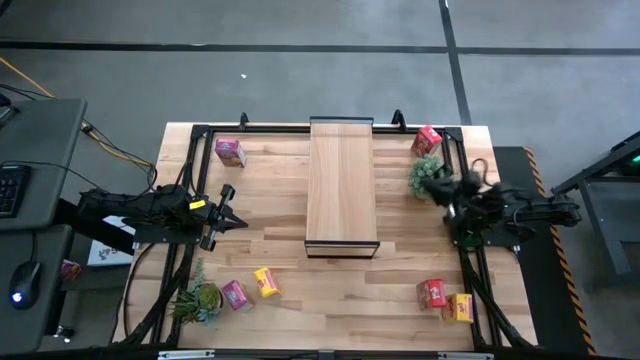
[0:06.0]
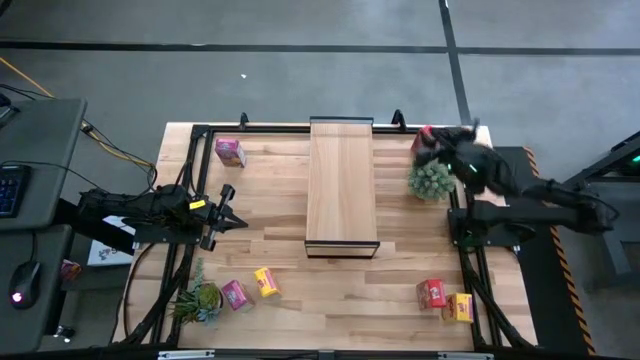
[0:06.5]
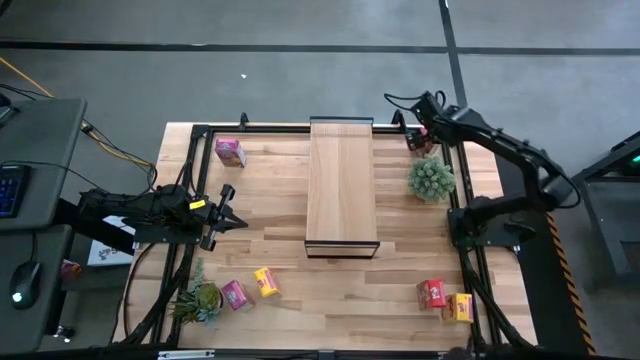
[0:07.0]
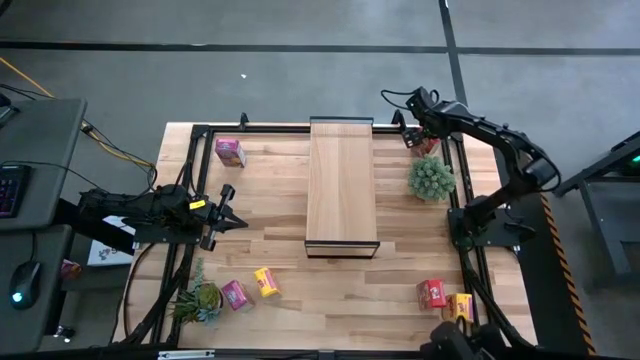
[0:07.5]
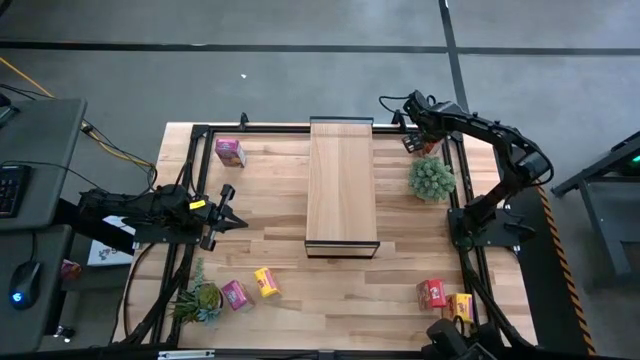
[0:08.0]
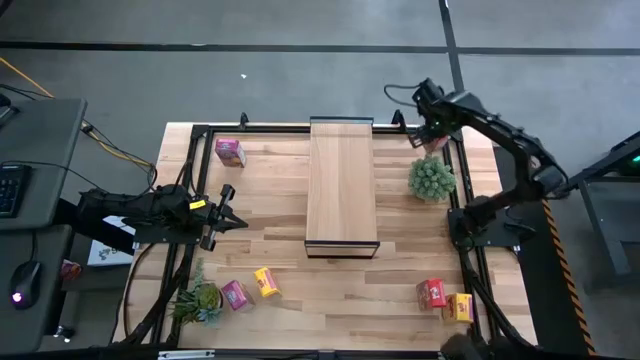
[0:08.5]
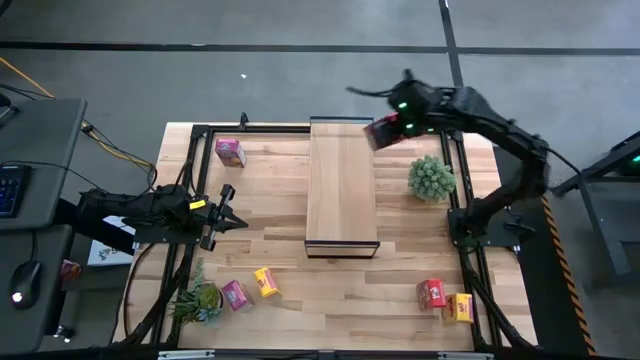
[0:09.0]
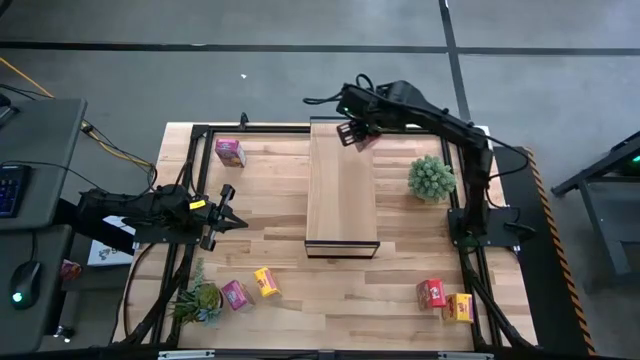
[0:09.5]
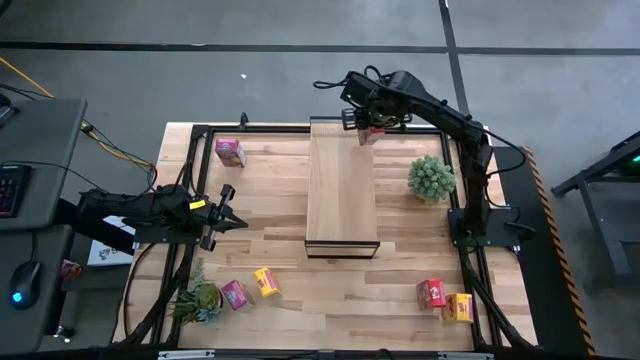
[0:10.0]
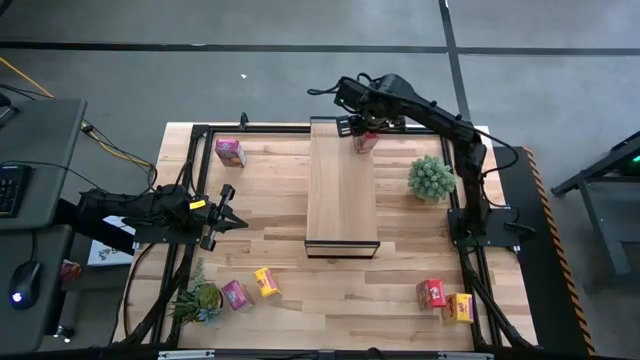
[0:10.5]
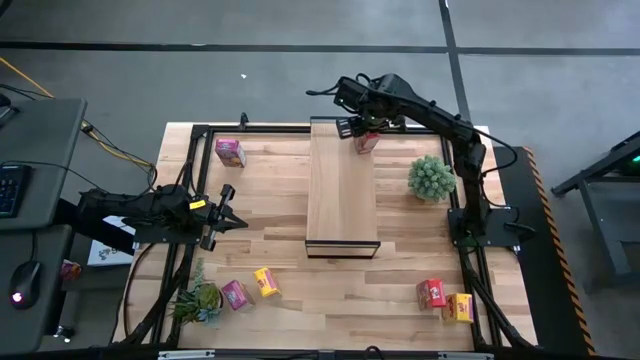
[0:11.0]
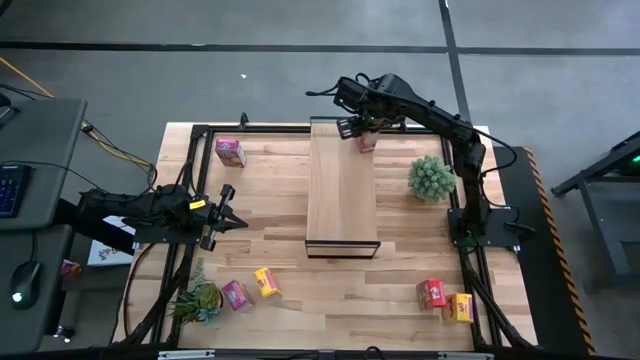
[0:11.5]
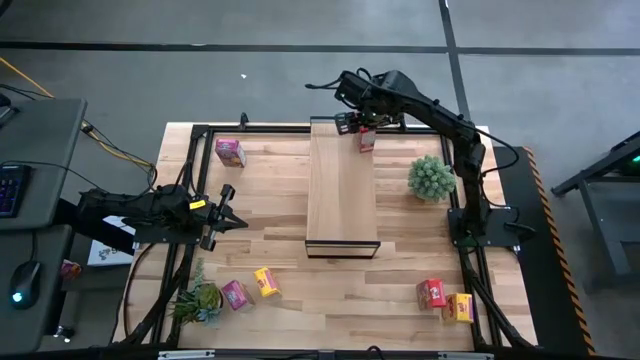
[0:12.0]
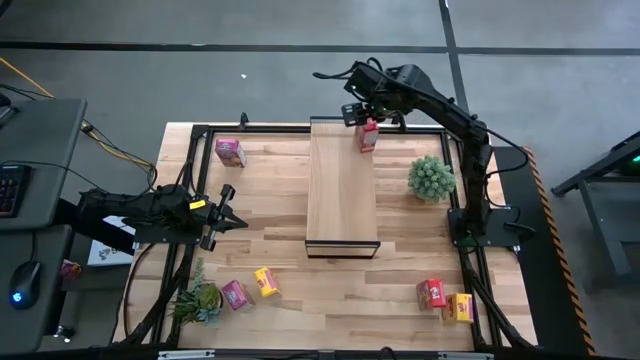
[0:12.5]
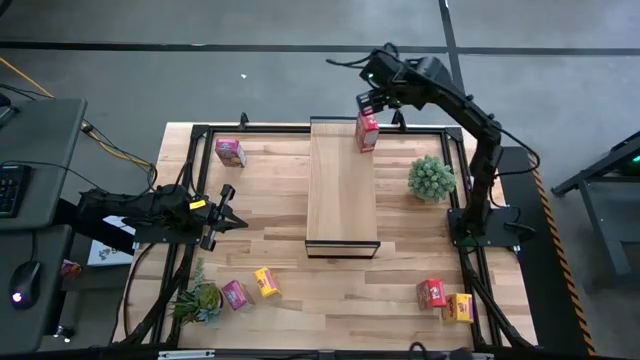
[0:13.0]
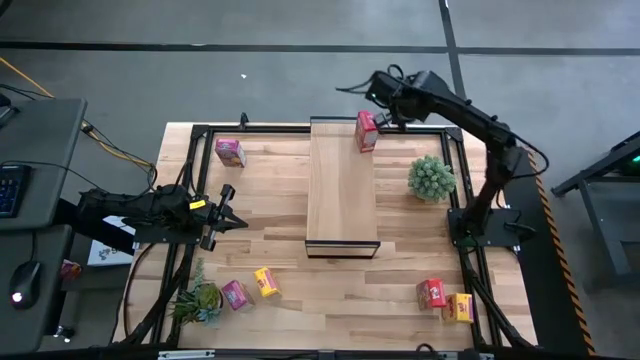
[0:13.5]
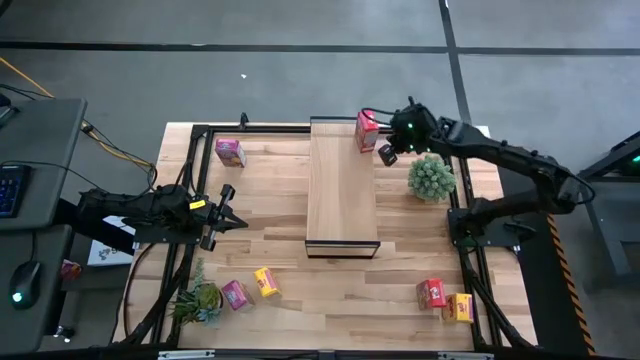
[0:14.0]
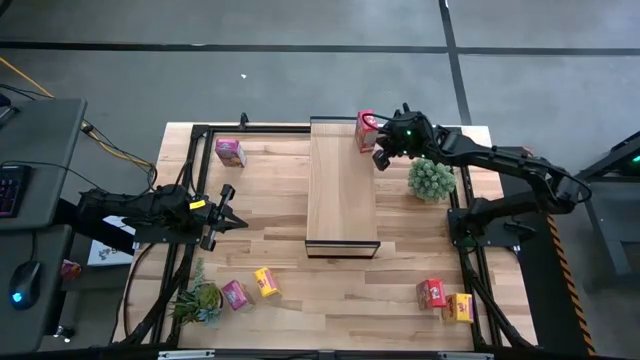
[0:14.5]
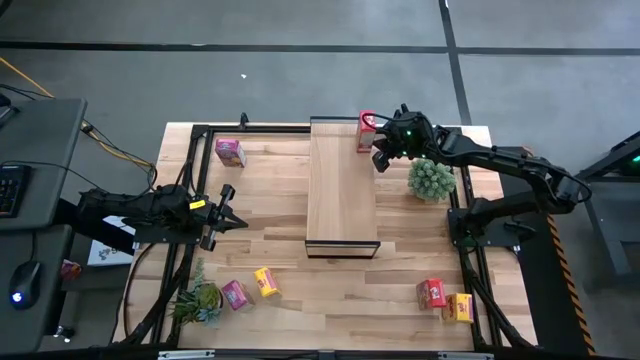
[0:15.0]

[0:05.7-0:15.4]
Task: Stack cereal on shelf
Put the top red cereal box on the shelf

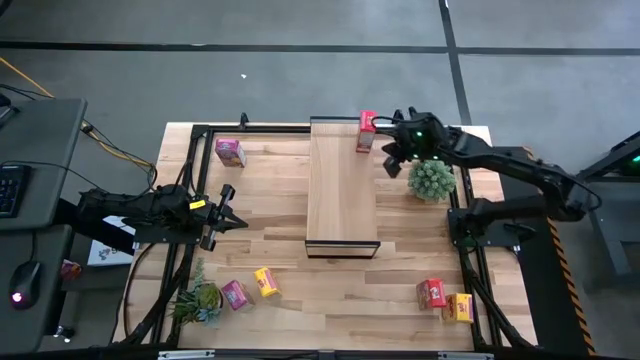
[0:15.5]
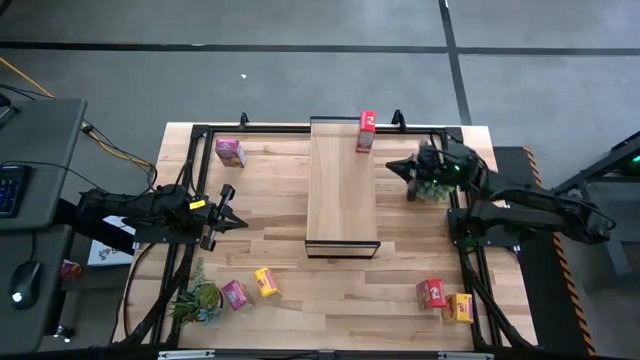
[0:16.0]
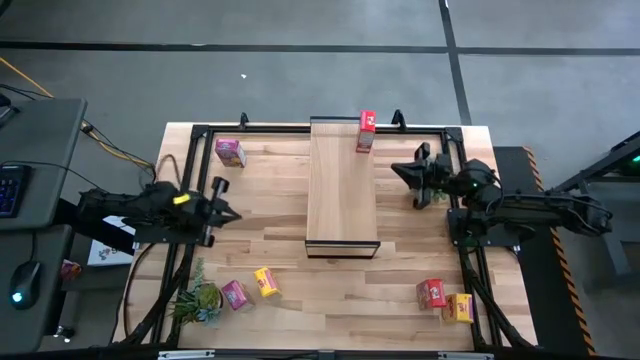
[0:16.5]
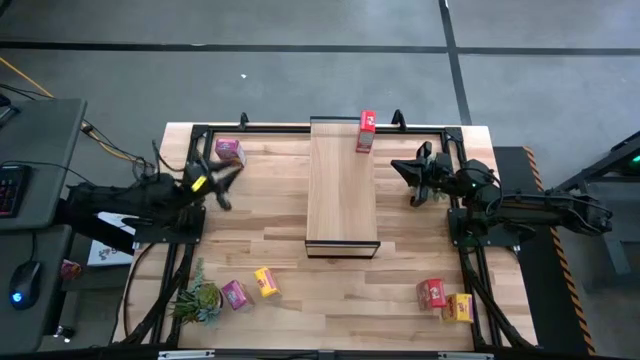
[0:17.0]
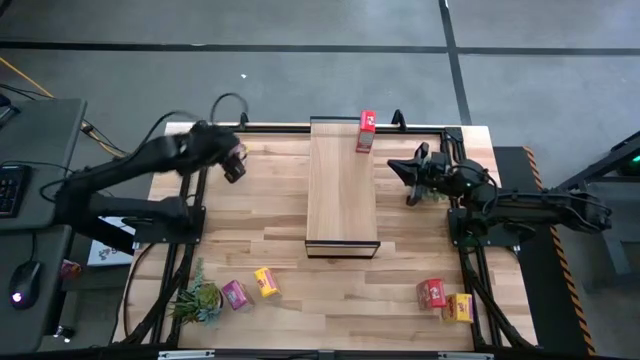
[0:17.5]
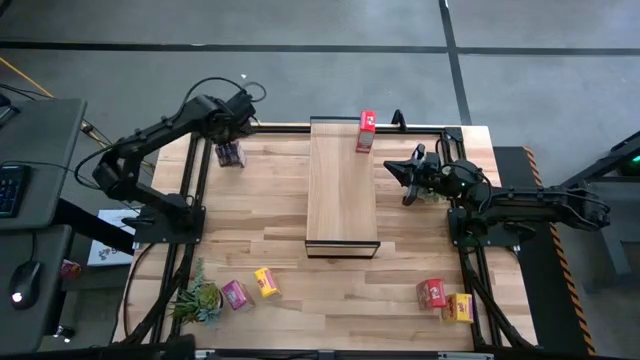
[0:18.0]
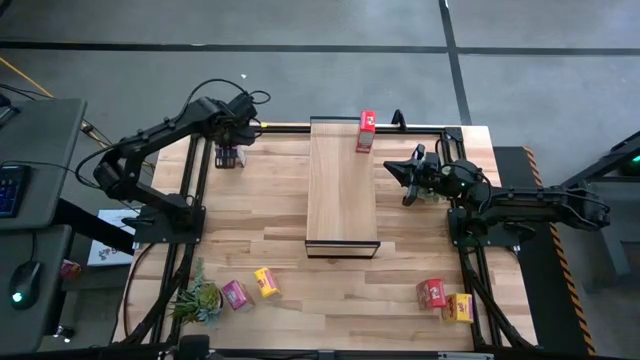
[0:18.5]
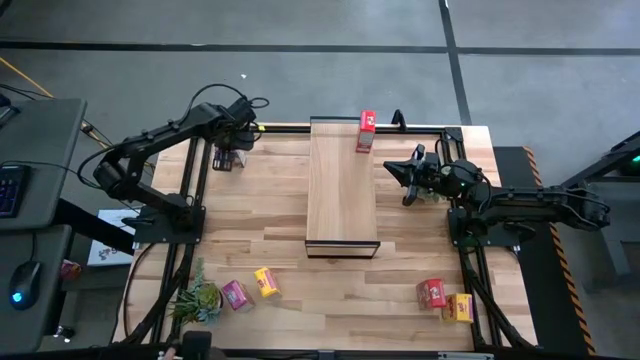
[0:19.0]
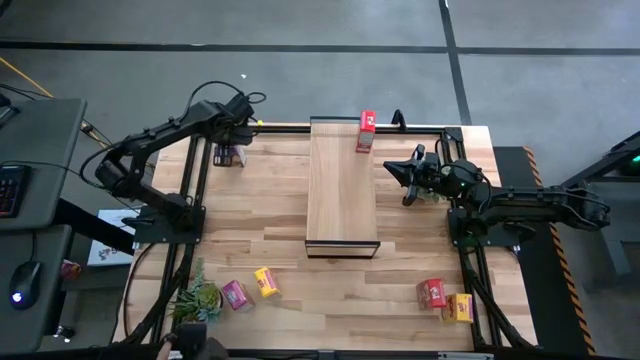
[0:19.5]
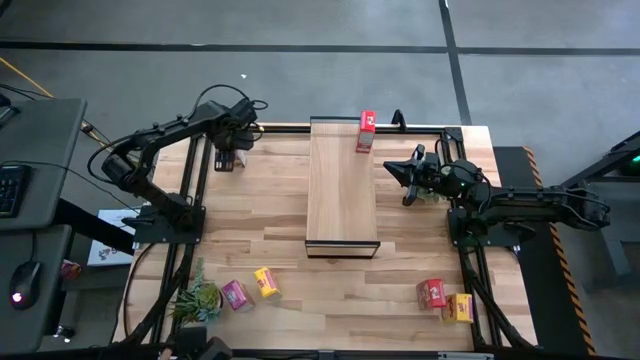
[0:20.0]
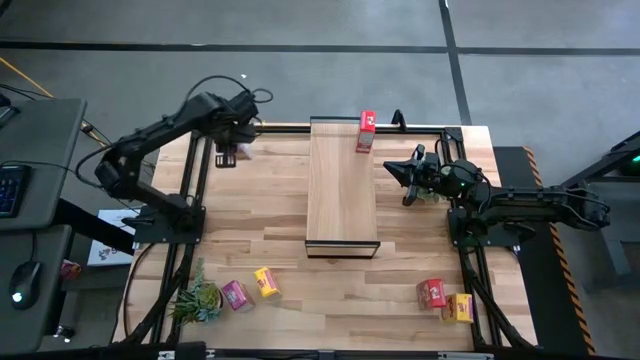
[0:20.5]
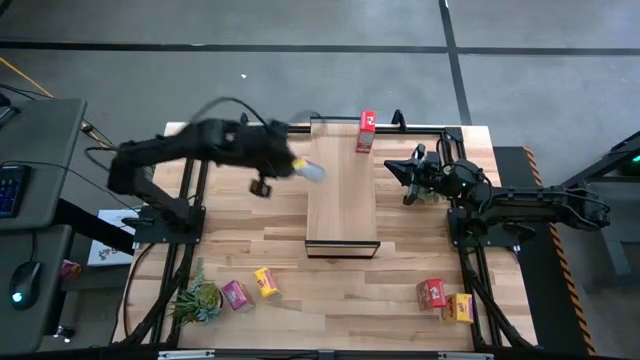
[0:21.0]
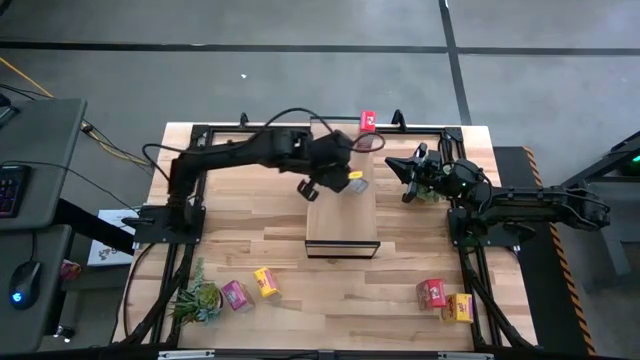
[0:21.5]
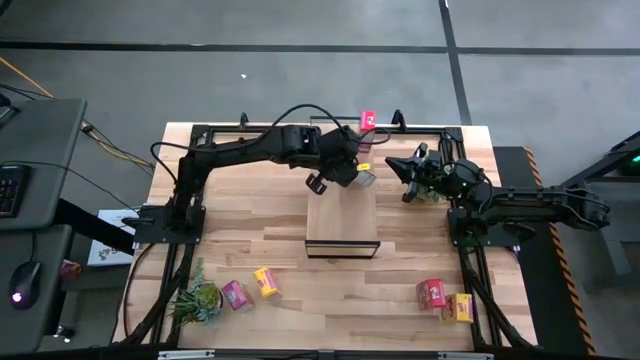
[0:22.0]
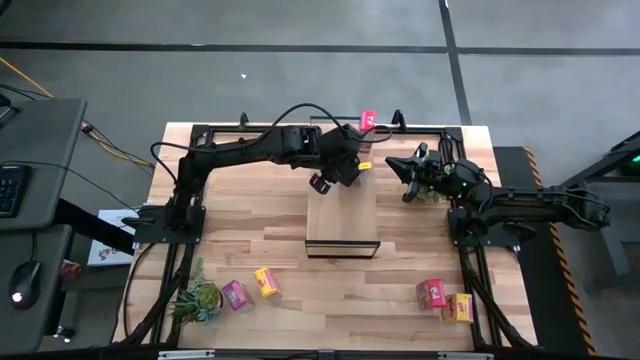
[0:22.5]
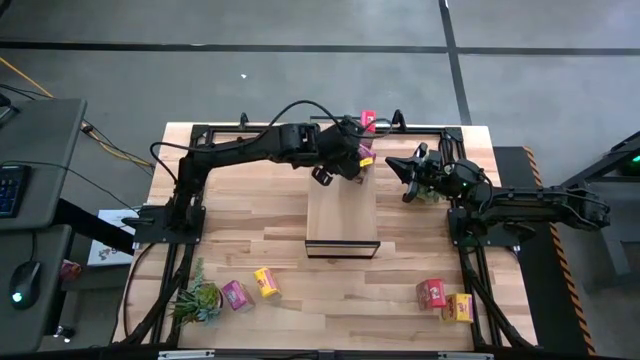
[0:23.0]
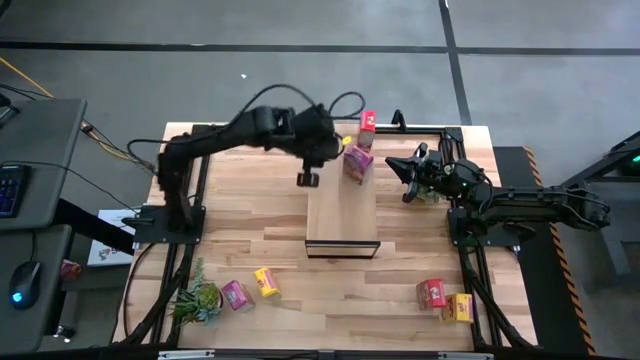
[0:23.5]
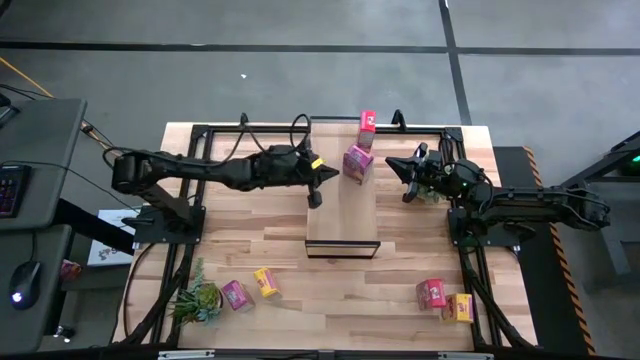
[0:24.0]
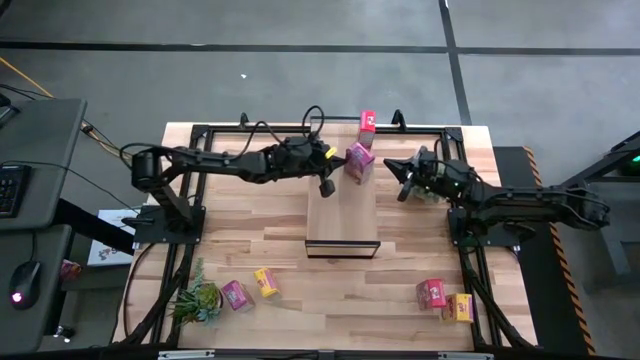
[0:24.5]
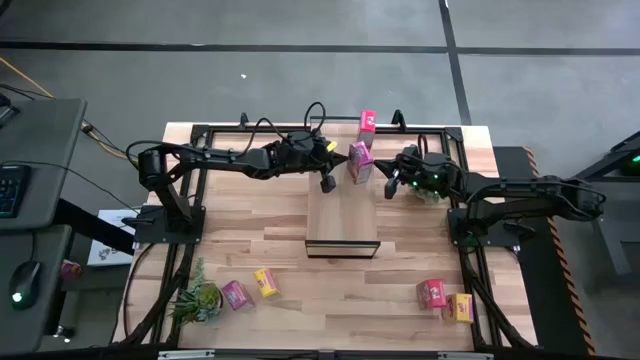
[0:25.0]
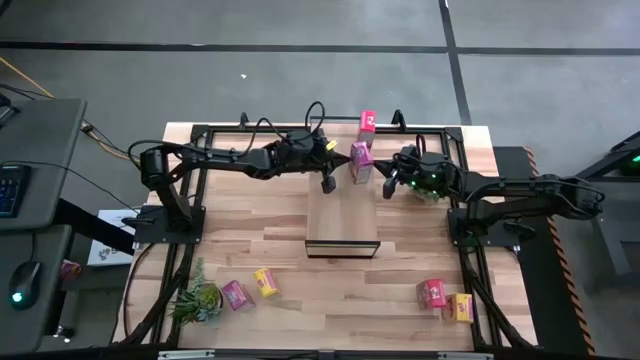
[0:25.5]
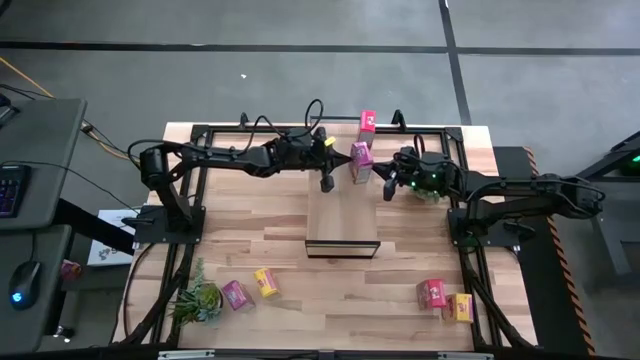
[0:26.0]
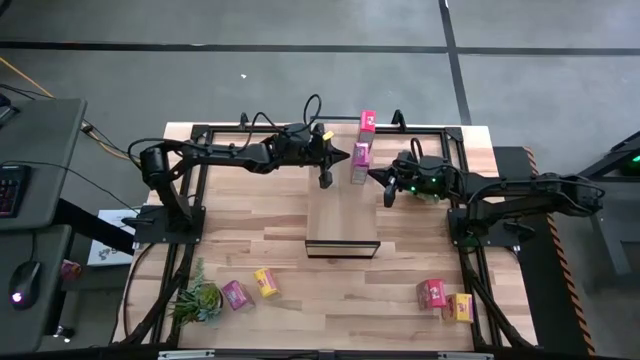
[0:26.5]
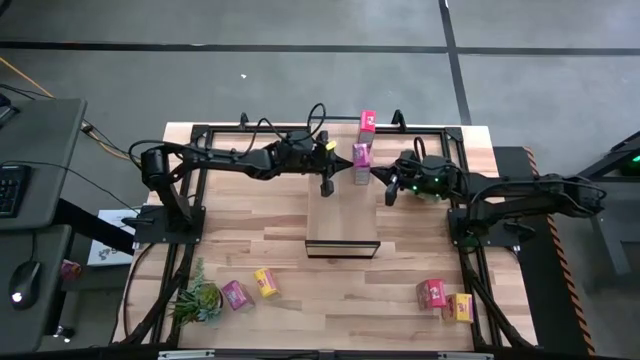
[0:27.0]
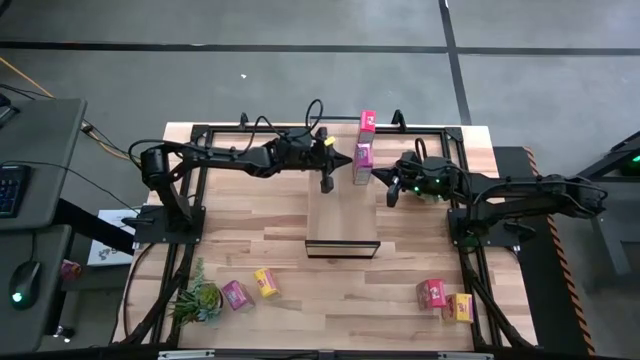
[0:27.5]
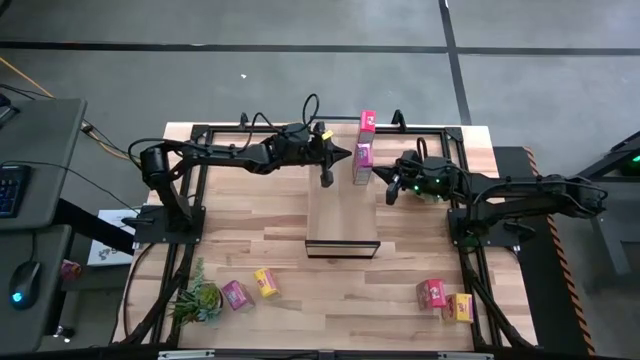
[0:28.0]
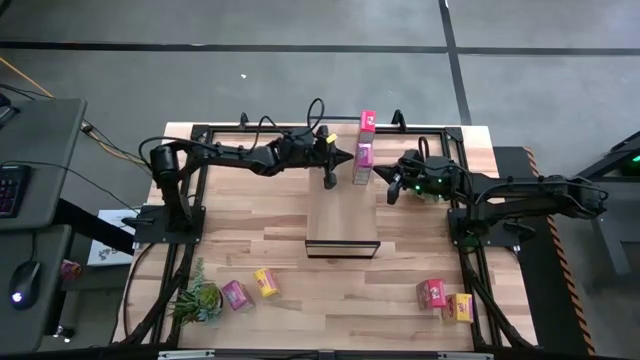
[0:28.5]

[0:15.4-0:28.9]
Put the top purple cereal box on the shelf
